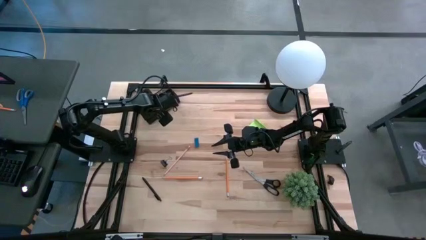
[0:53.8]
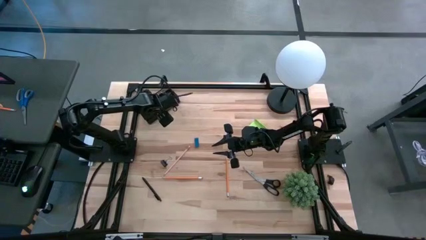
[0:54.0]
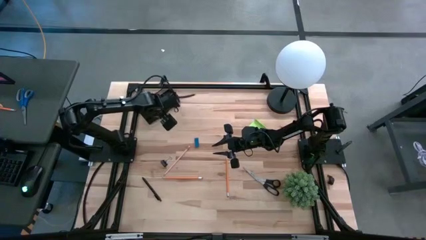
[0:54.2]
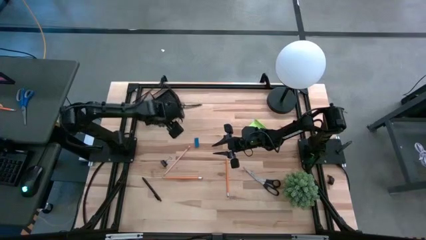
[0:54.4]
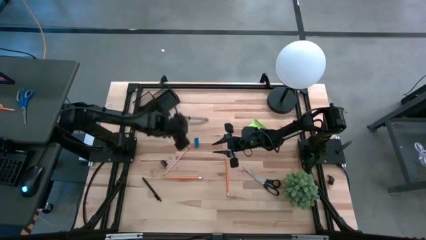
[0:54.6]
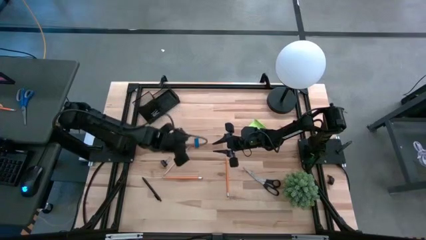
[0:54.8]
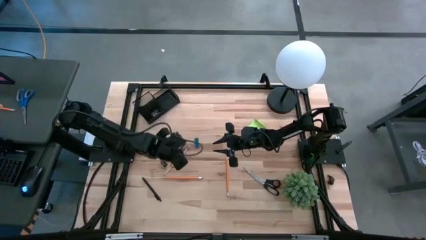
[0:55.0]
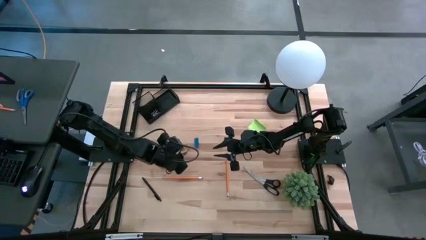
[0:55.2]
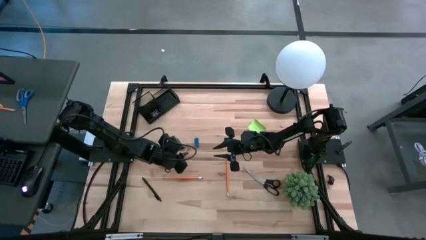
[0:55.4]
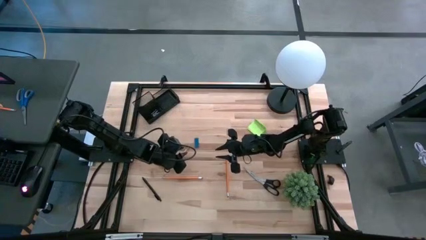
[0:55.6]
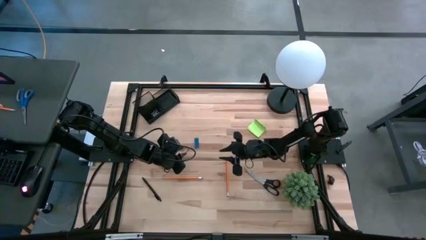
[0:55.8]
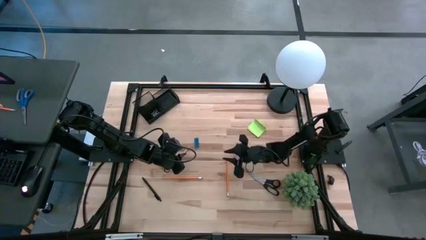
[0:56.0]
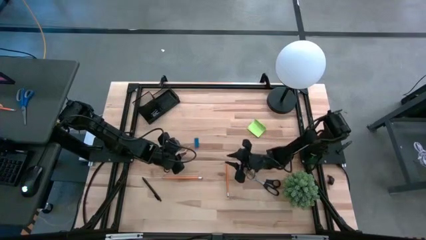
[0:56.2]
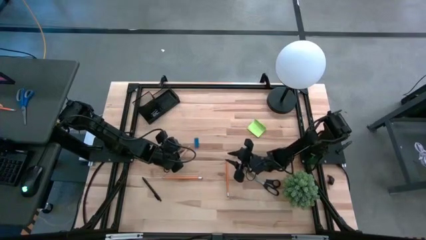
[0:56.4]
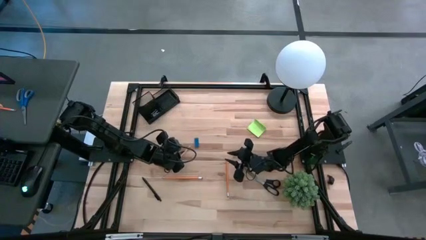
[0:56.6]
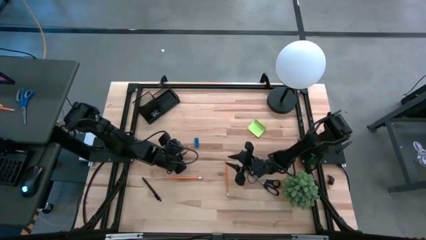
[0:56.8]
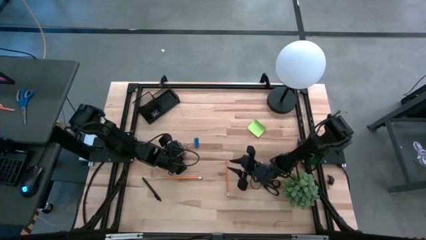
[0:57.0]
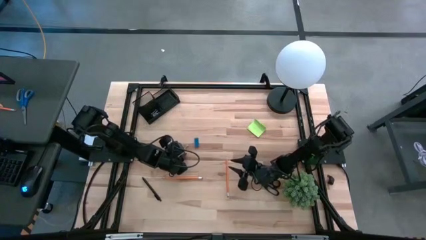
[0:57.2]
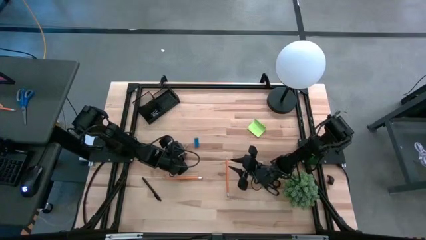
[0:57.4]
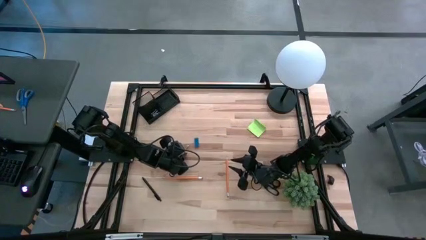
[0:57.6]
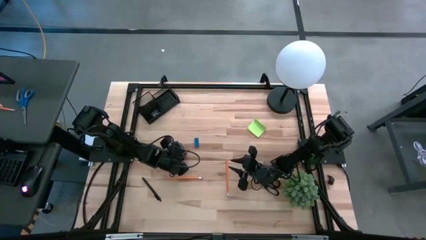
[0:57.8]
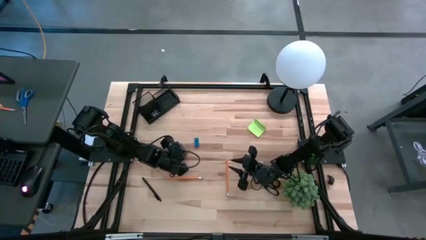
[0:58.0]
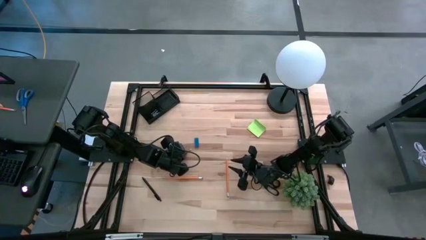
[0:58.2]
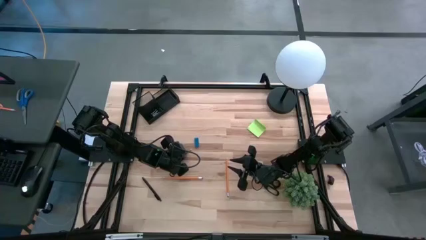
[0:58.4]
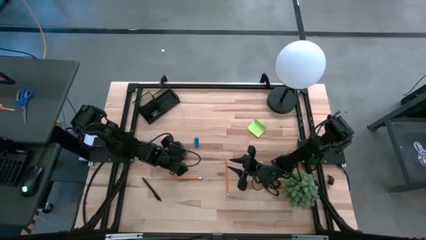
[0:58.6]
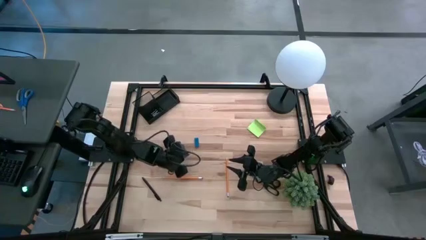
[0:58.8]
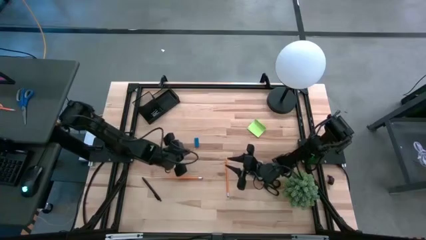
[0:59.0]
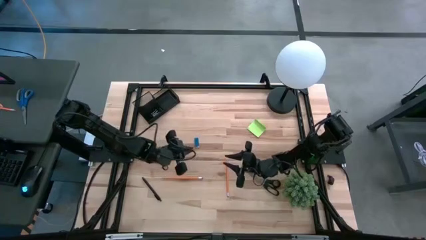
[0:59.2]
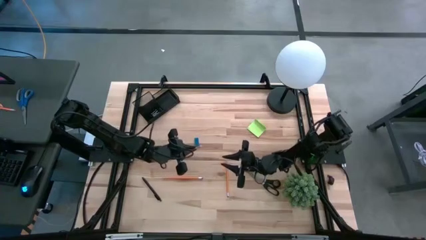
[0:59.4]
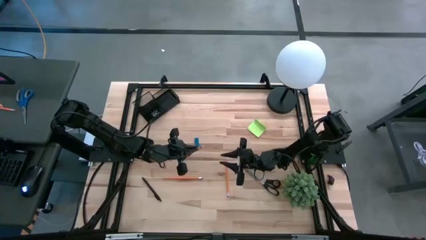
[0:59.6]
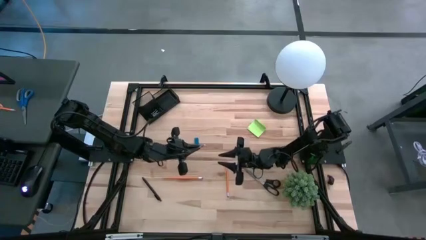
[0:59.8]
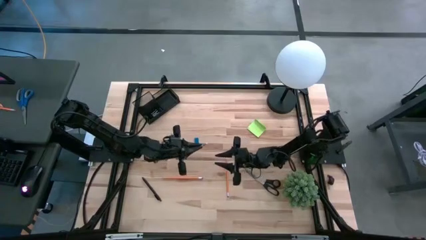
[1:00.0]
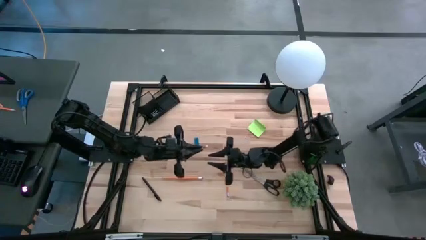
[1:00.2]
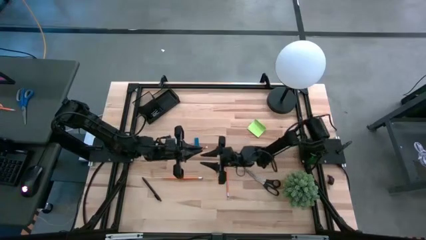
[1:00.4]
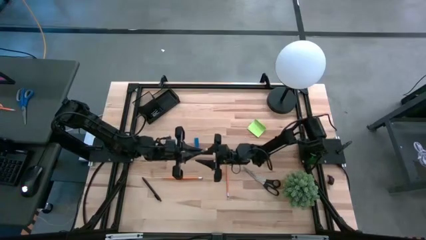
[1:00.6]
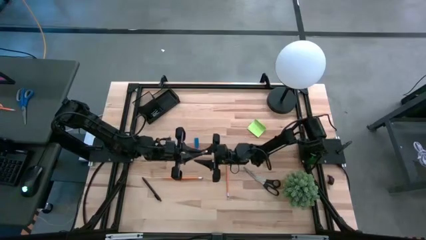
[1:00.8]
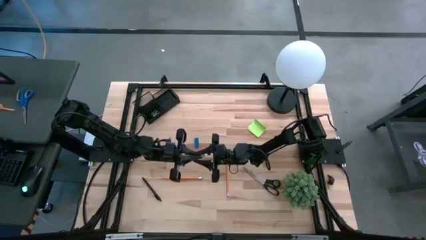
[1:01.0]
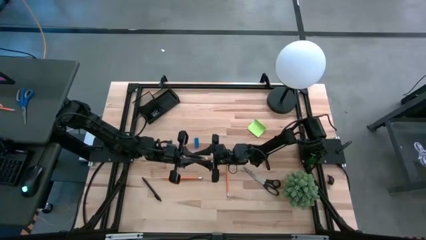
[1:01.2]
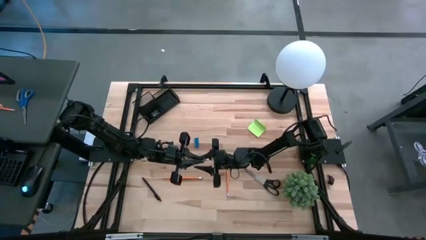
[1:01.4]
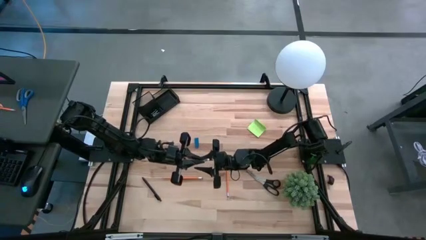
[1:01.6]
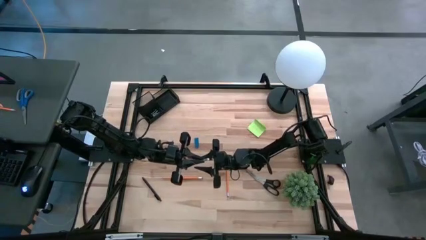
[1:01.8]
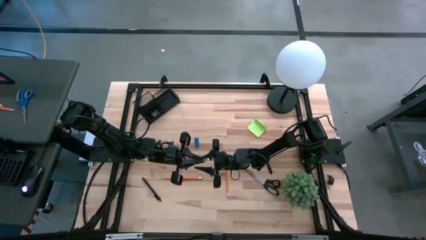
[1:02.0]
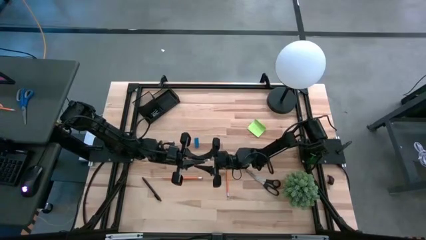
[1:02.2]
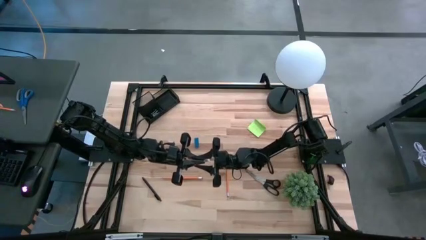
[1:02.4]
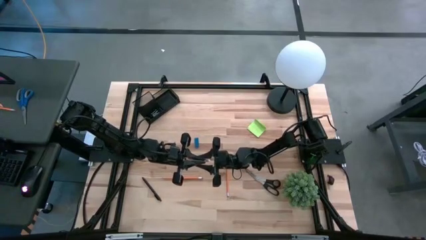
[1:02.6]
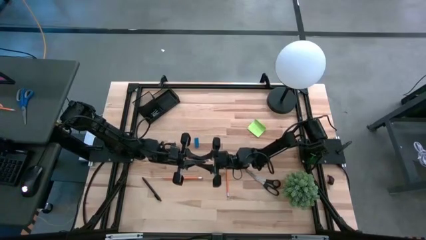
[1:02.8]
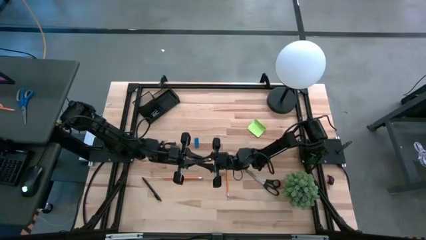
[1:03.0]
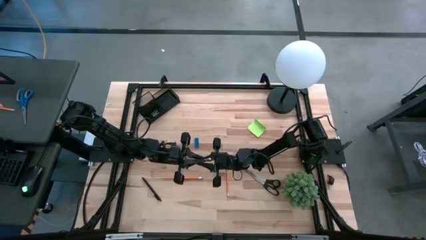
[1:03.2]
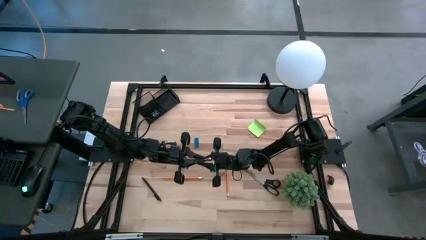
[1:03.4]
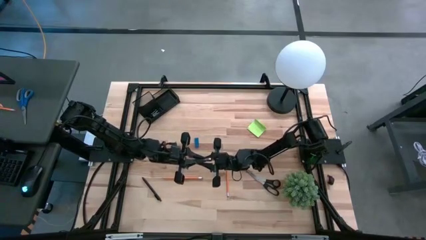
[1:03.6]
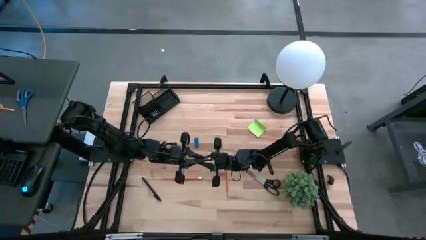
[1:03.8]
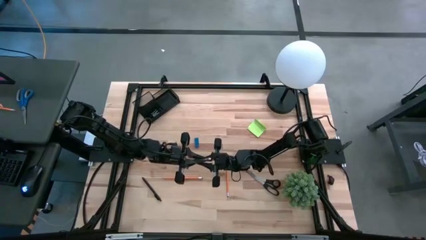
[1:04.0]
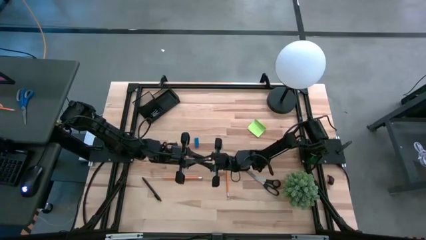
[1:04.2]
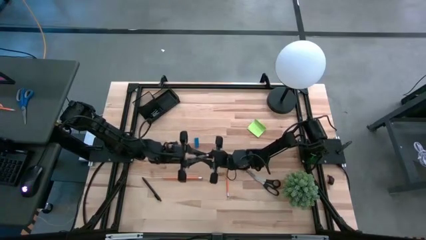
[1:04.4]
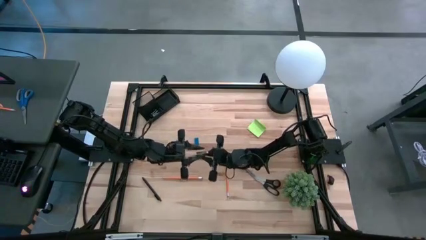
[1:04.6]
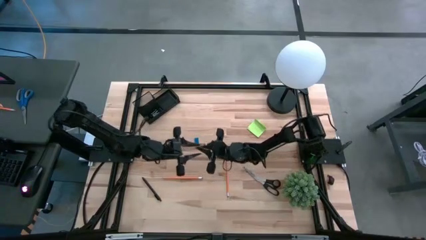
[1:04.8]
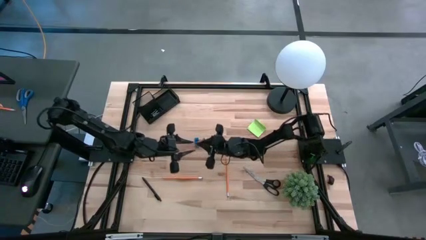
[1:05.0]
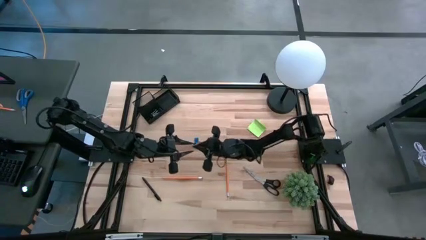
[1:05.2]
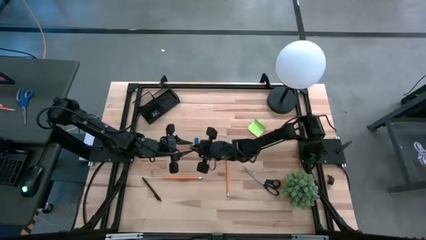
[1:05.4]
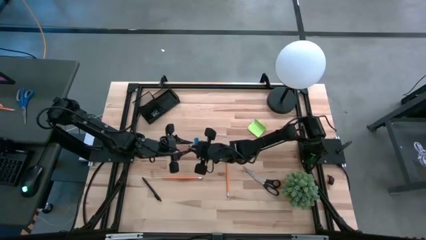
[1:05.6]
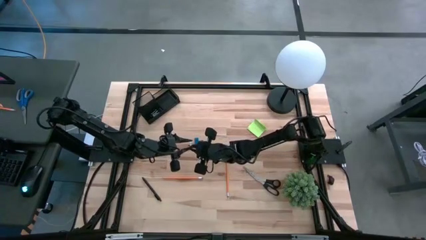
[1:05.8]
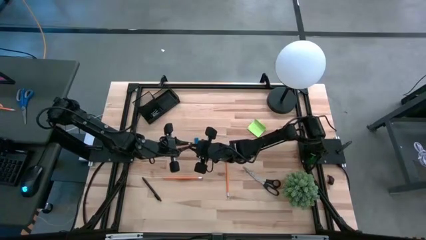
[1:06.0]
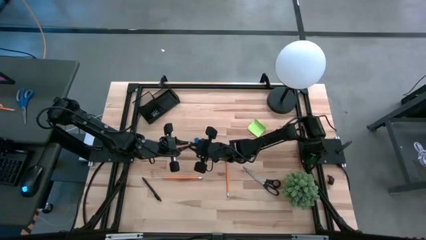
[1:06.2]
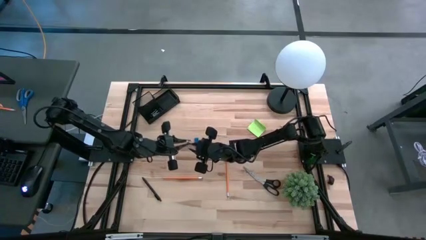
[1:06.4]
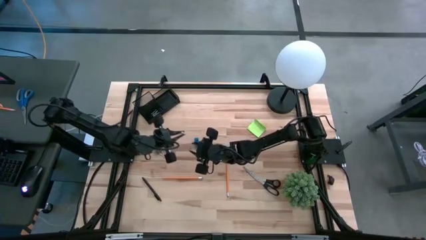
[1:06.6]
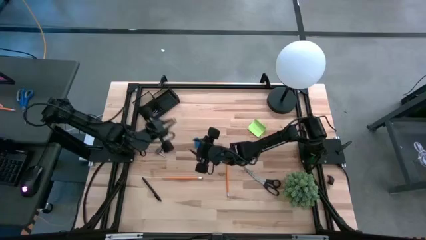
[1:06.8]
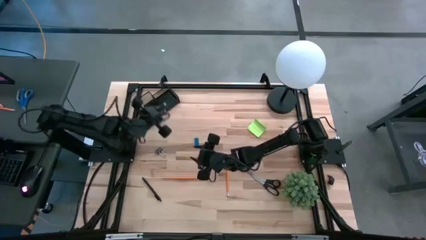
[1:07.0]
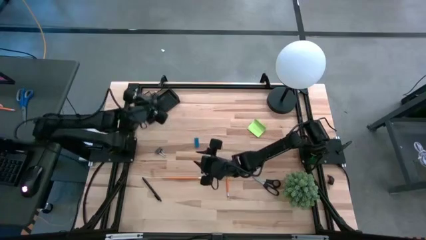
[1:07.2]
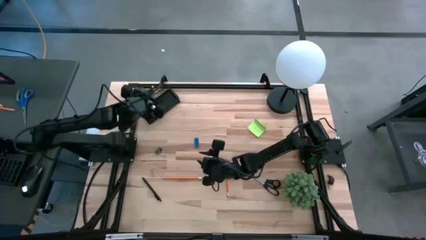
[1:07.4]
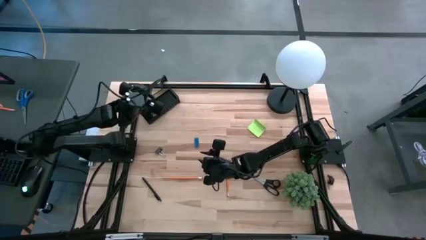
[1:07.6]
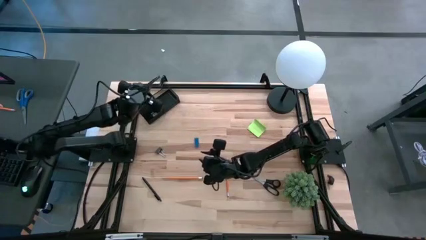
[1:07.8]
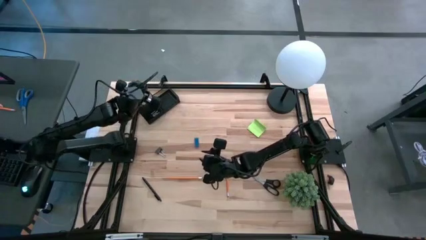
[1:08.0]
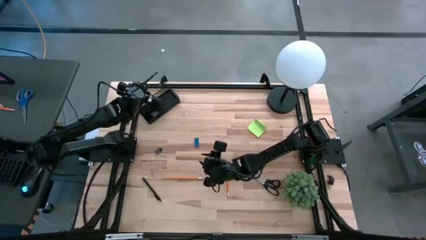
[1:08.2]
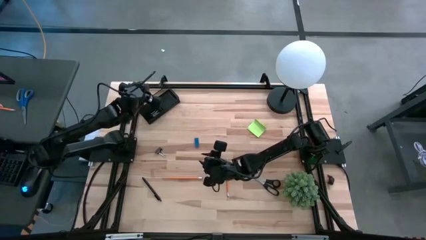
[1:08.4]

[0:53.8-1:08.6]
Task: Pick and place office supplies into organizer
Put the brown pencil into the top left section of the desk organizer
